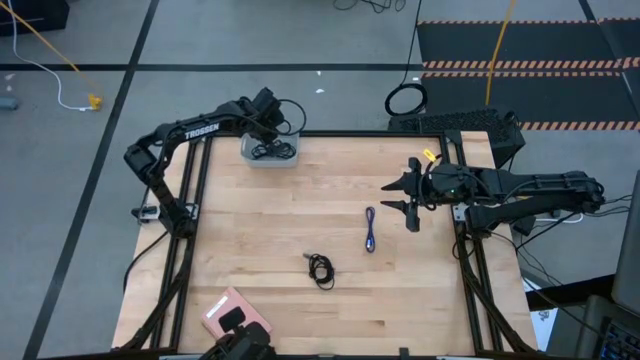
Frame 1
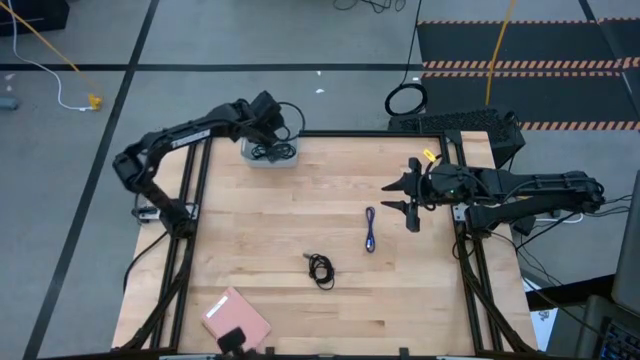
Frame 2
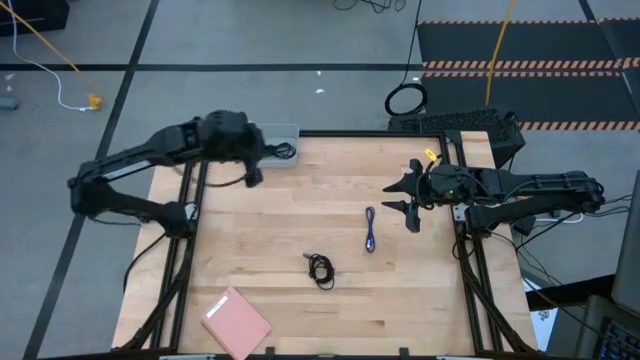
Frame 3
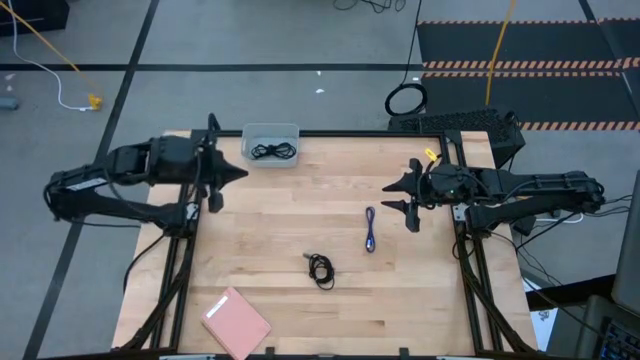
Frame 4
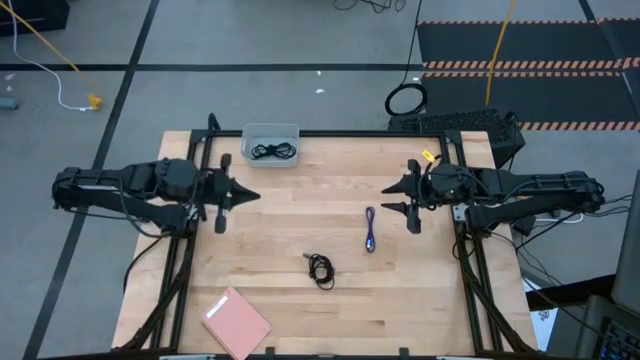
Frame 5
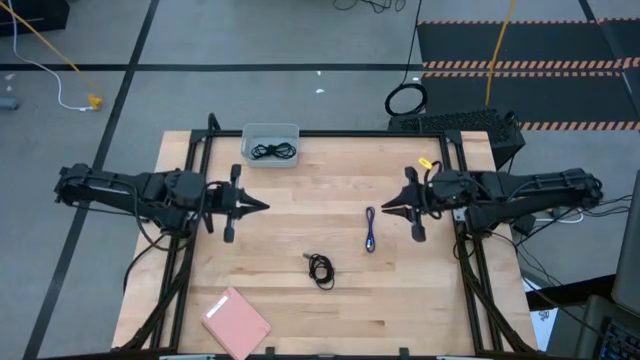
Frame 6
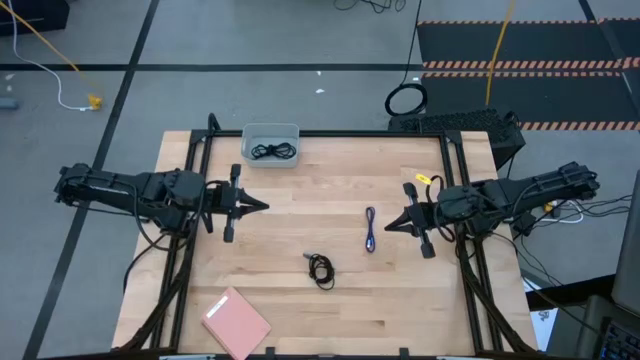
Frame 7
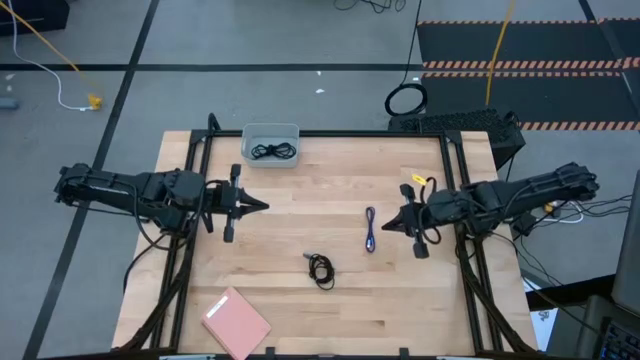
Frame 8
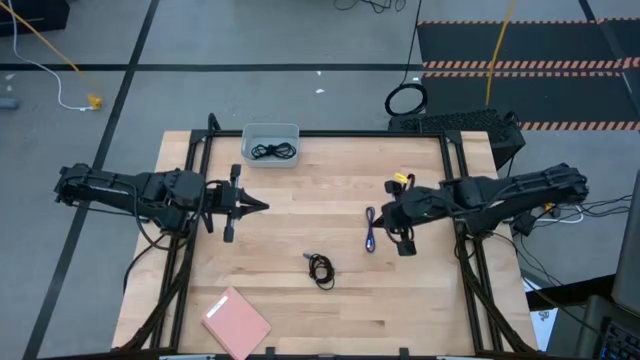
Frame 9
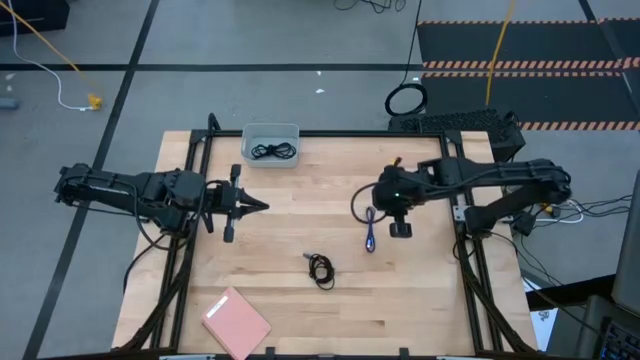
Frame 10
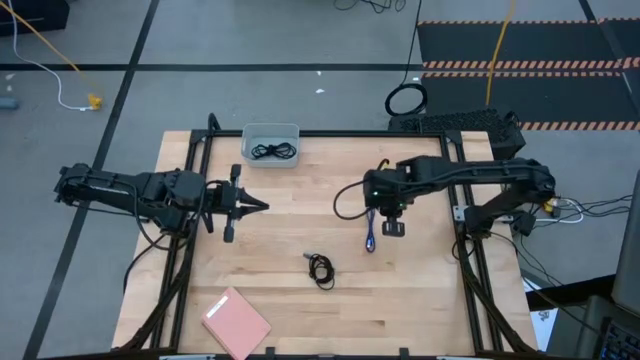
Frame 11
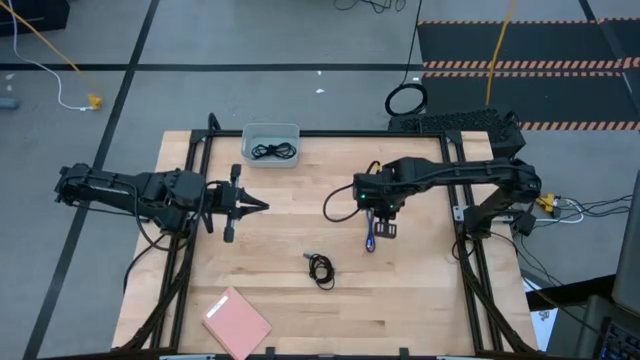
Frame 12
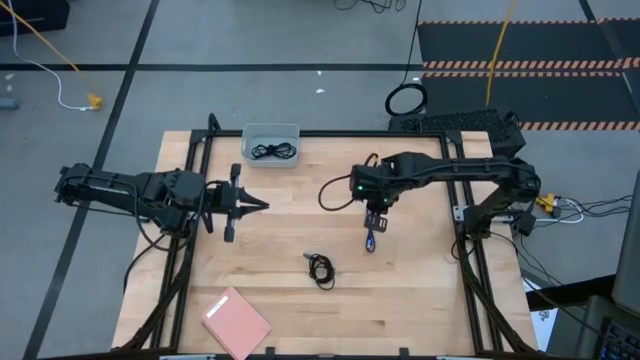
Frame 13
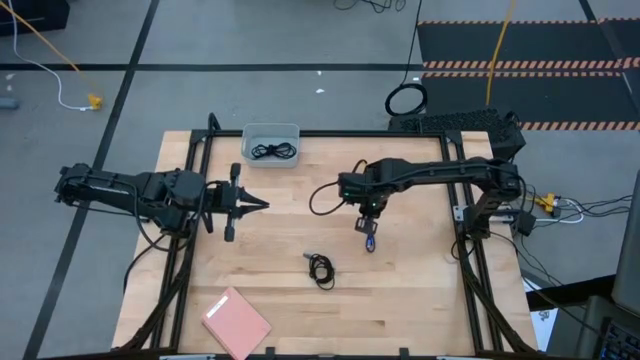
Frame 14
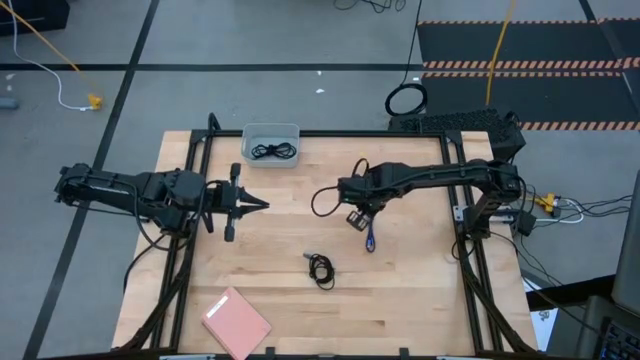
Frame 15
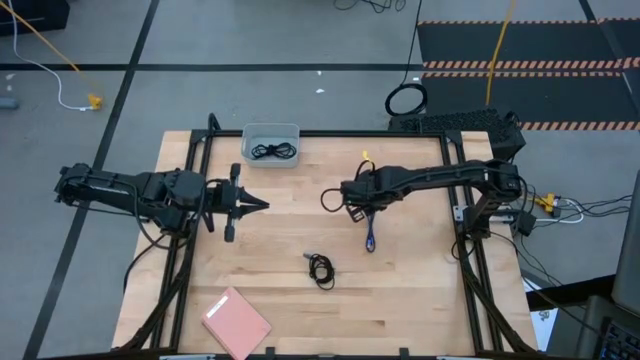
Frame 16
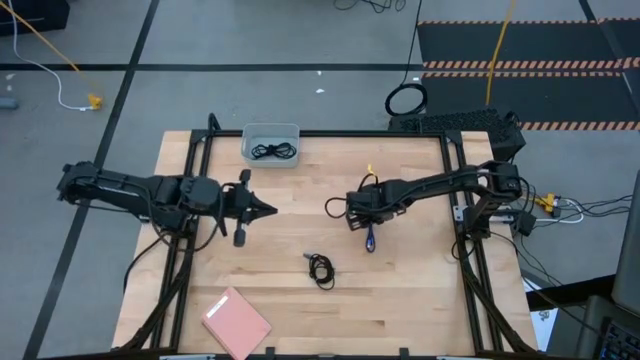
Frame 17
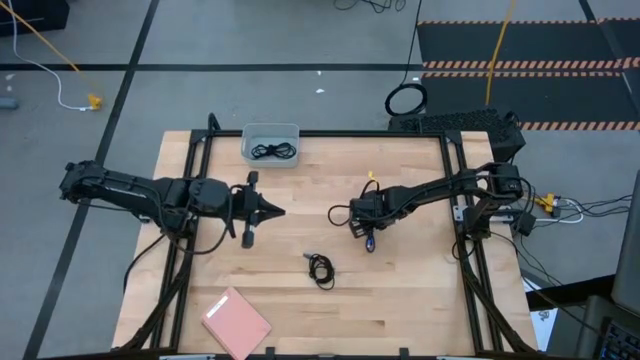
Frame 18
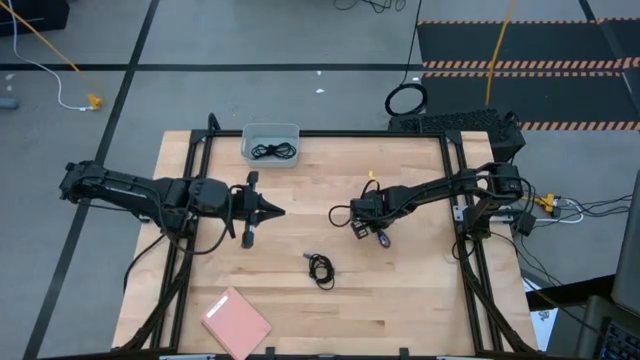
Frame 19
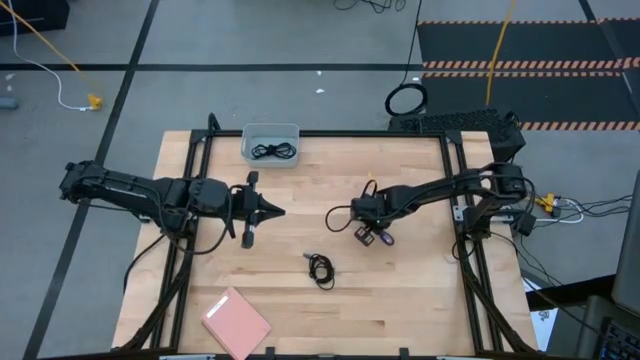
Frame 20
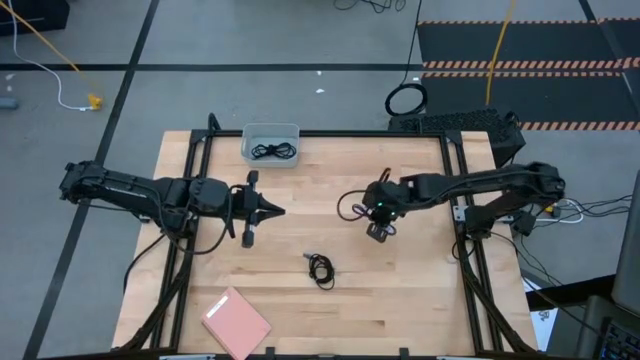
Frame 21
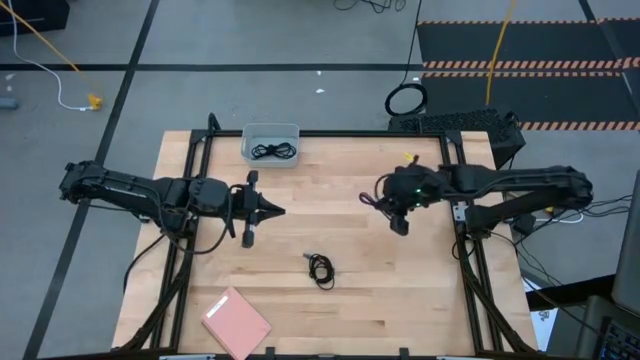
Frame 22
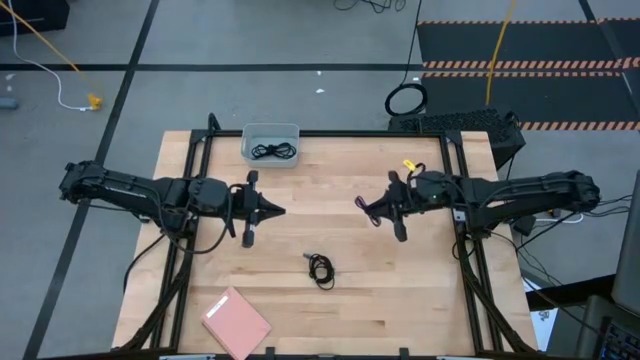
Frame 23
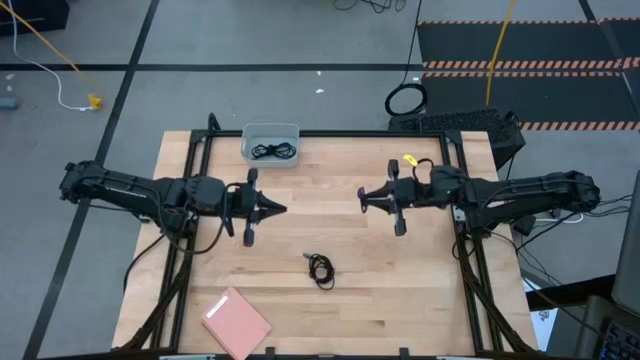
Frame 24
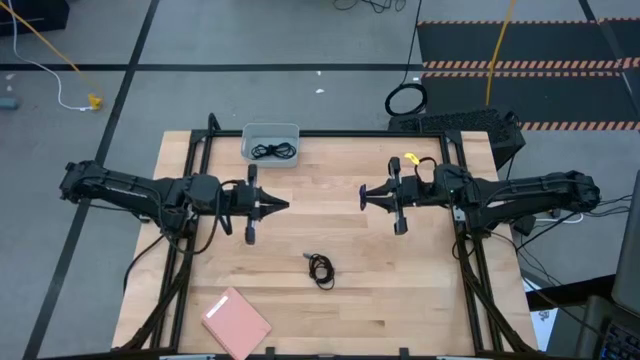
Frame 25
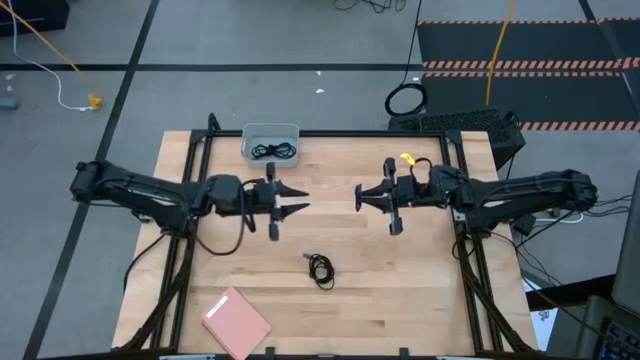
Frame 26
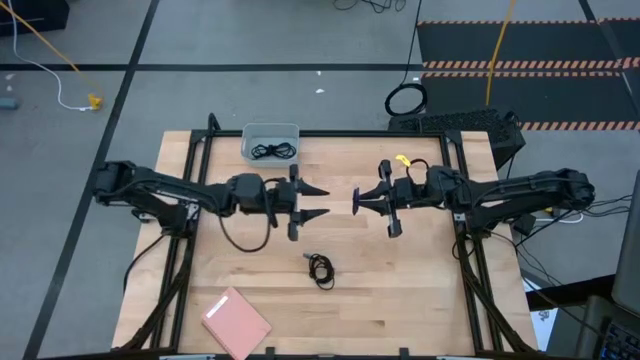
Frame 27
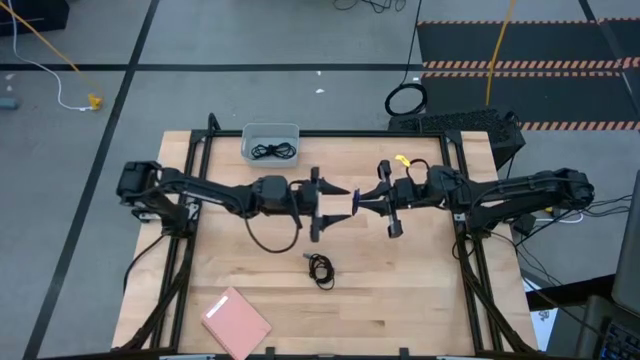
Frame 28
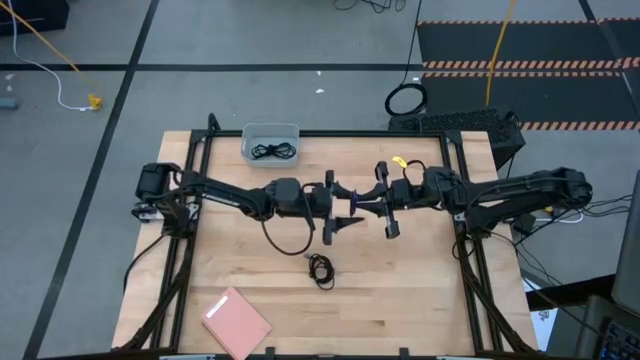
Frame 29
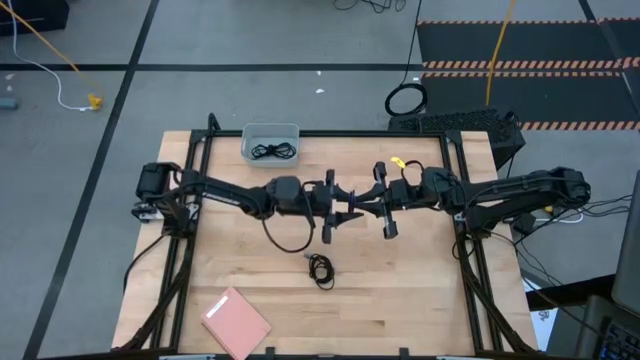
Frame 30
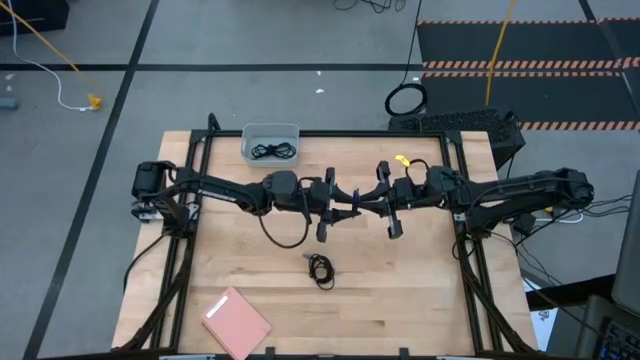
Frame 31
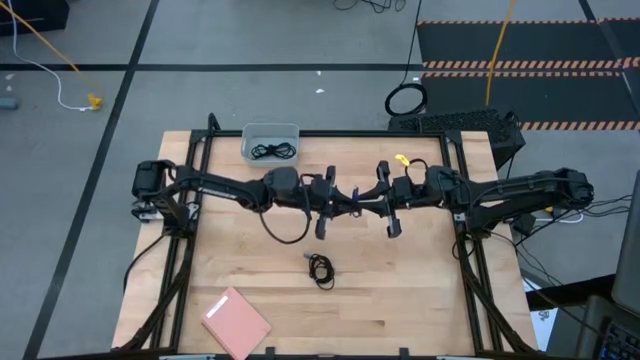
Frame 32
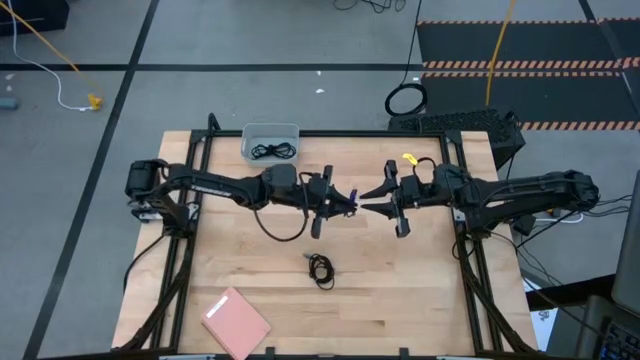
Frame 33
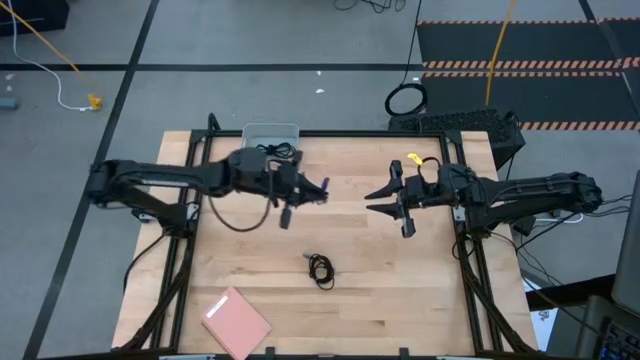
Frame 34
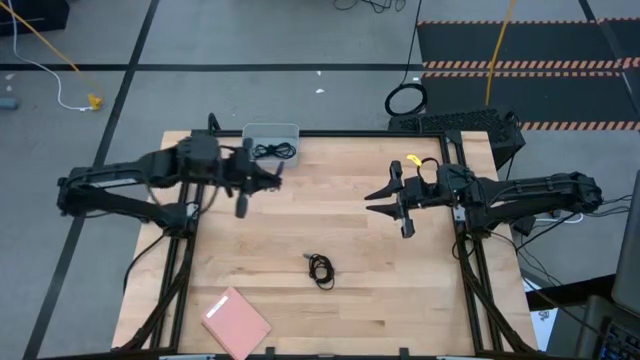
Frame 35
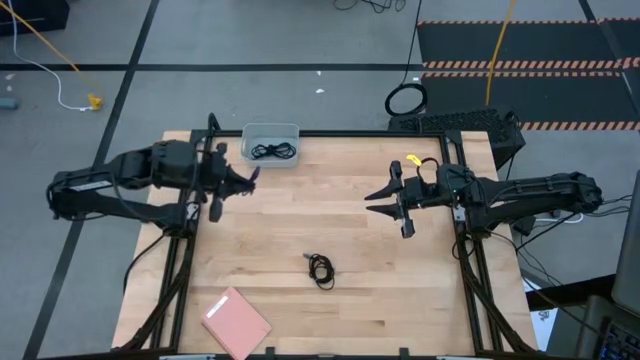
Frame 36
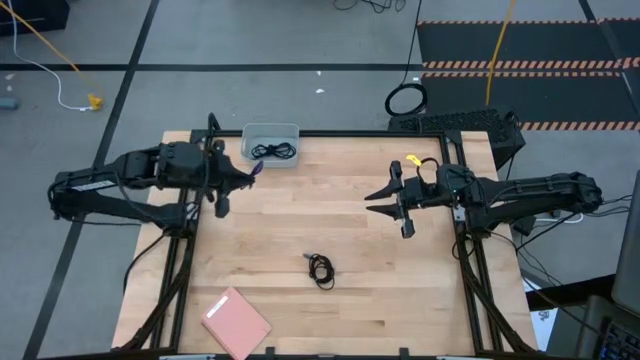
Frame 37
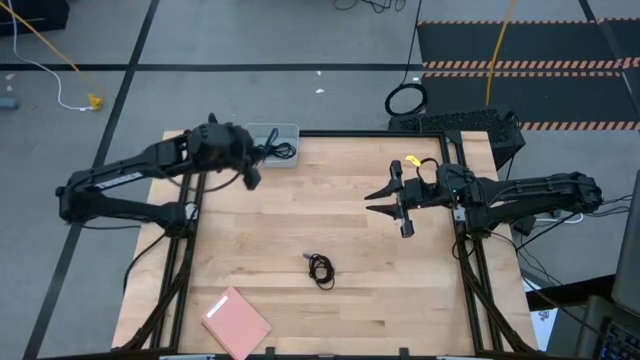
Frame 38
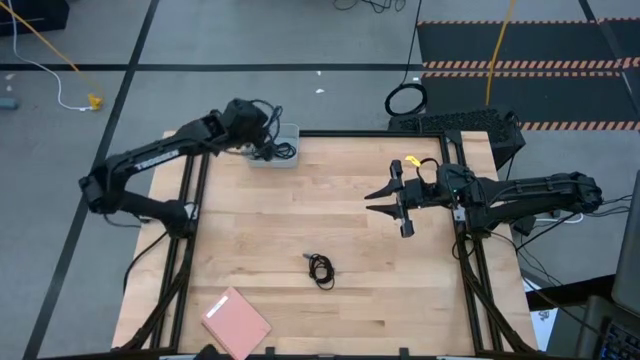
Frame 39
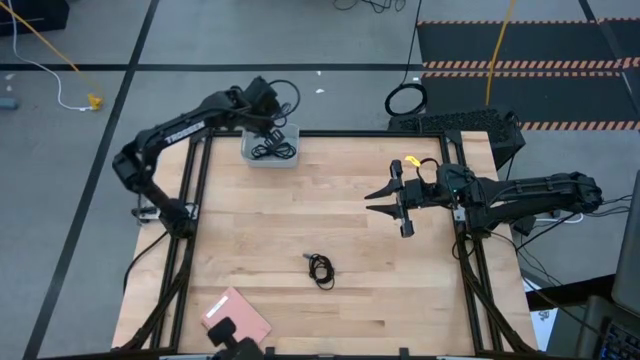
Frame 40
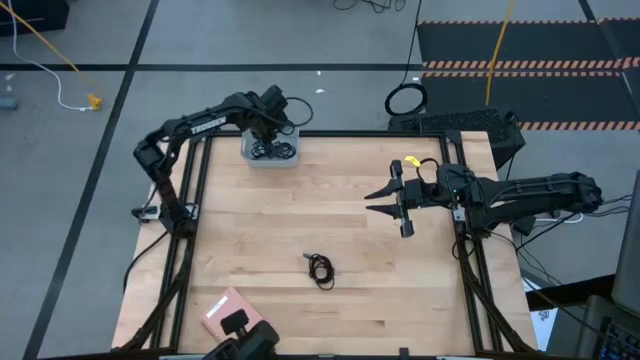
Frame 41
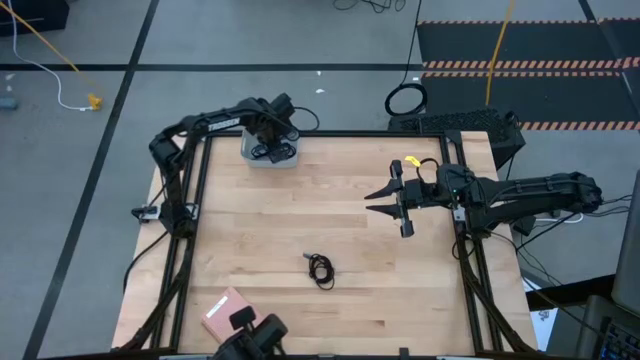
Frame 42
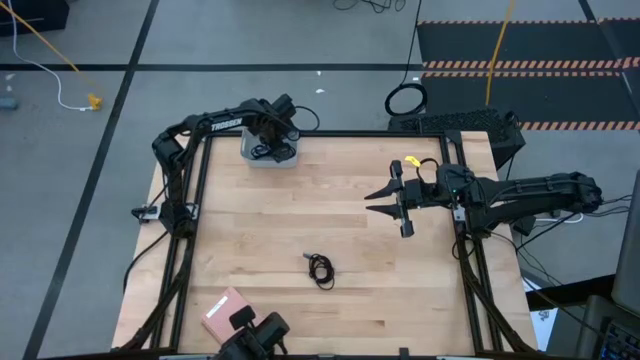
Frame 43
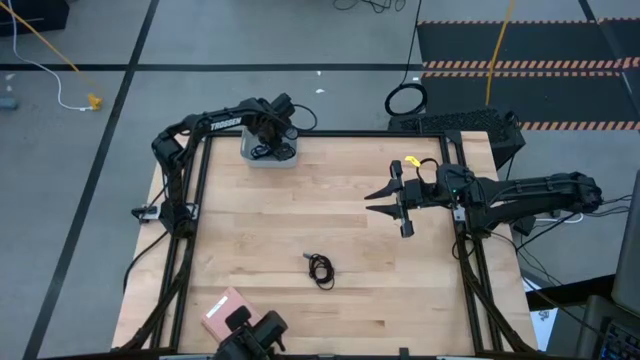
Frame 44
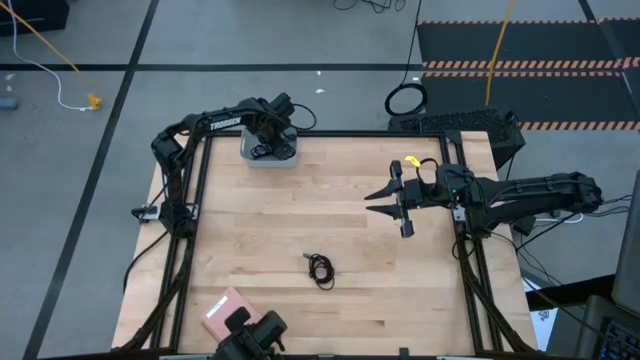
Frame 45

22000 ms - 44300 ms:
Task: Pick and place USB-C Cables
Put the black purple charger cable into the white bin
